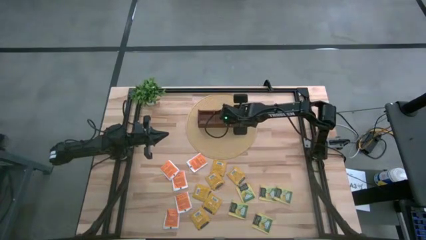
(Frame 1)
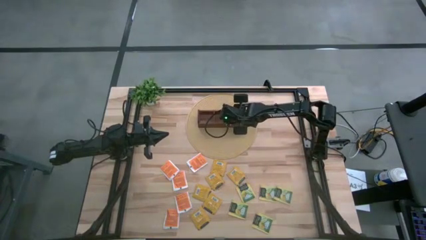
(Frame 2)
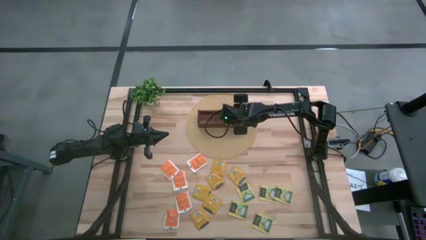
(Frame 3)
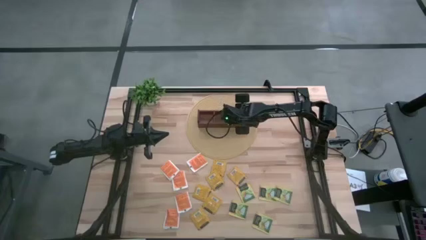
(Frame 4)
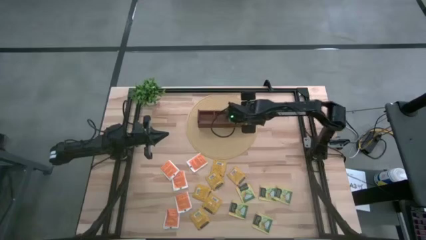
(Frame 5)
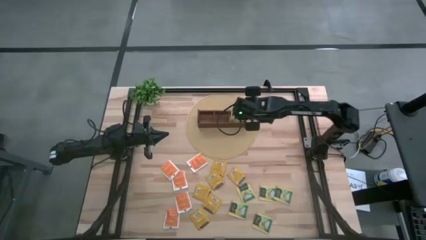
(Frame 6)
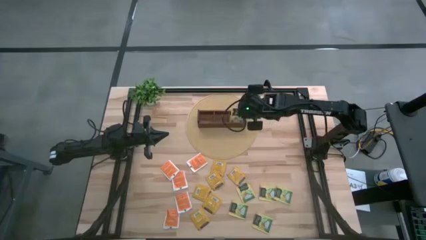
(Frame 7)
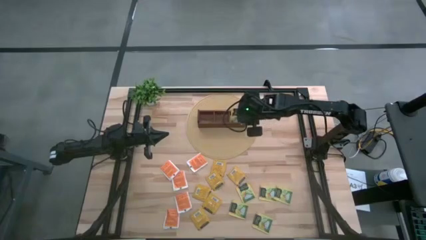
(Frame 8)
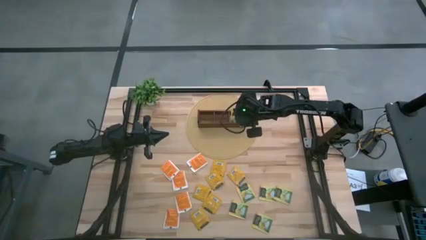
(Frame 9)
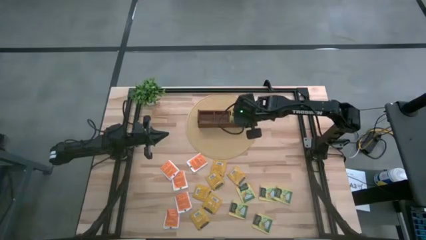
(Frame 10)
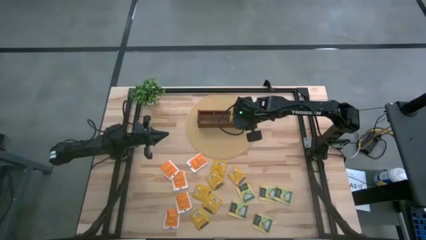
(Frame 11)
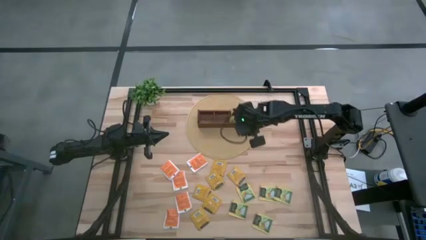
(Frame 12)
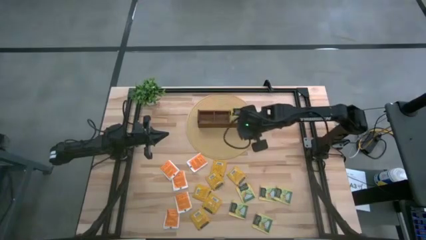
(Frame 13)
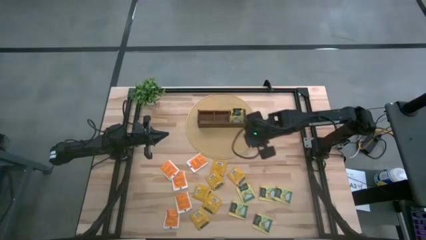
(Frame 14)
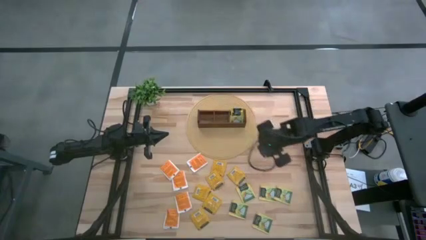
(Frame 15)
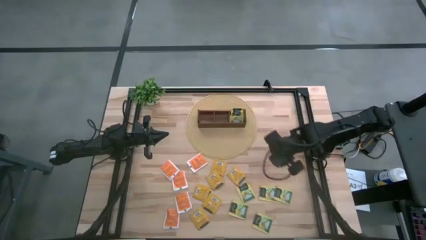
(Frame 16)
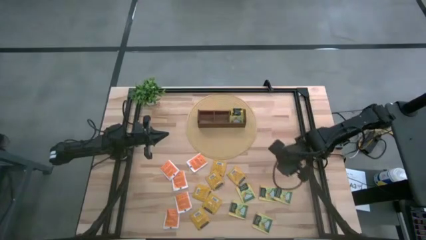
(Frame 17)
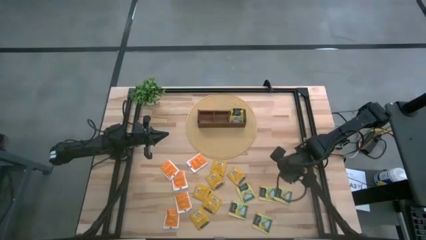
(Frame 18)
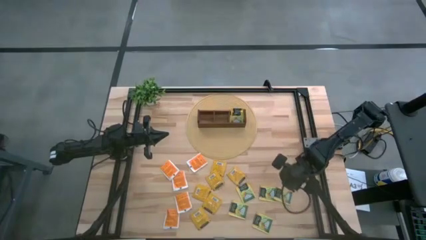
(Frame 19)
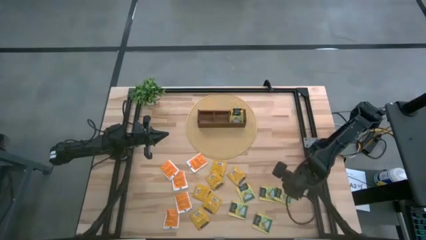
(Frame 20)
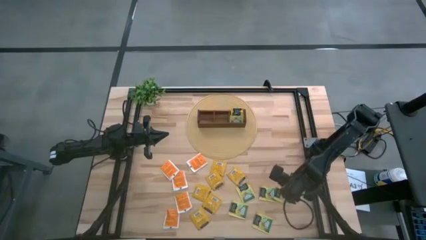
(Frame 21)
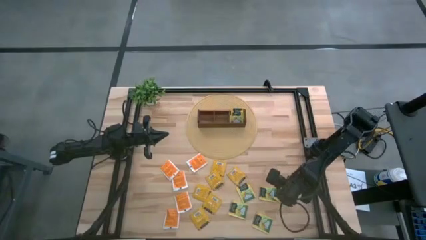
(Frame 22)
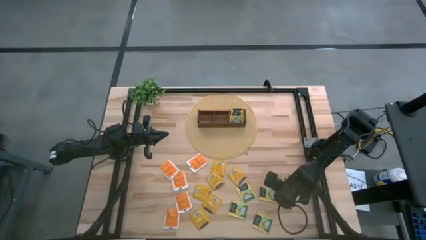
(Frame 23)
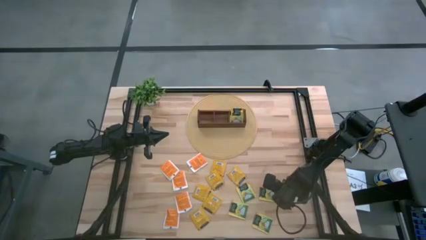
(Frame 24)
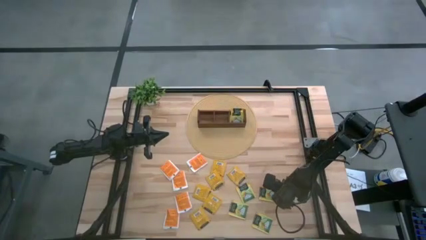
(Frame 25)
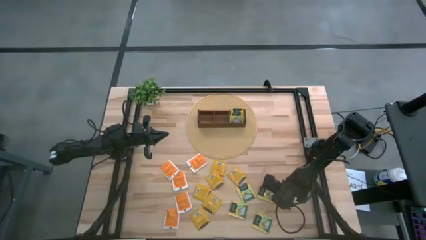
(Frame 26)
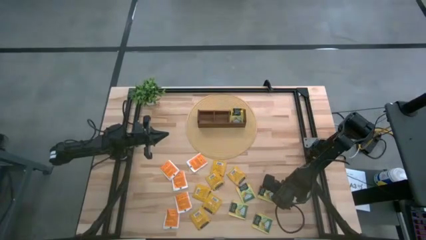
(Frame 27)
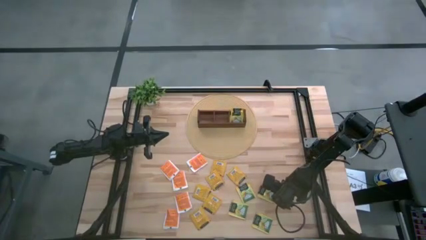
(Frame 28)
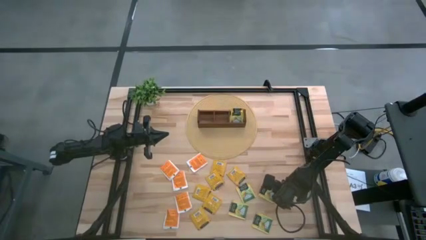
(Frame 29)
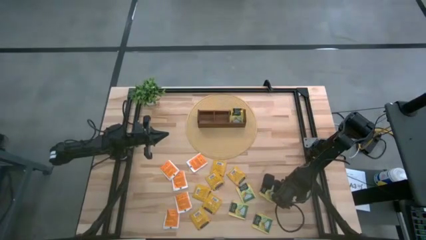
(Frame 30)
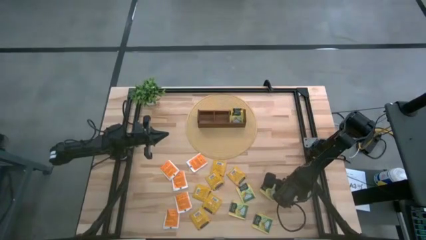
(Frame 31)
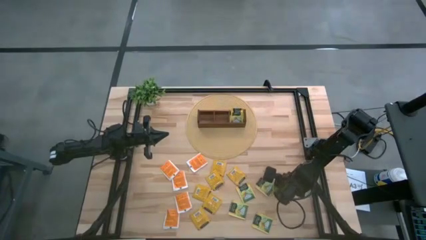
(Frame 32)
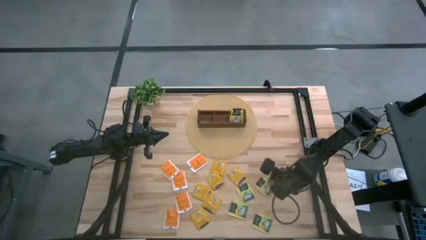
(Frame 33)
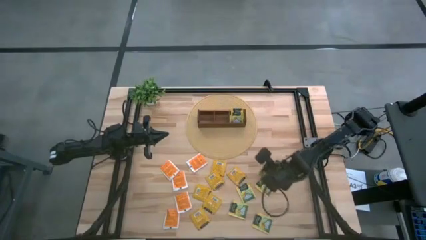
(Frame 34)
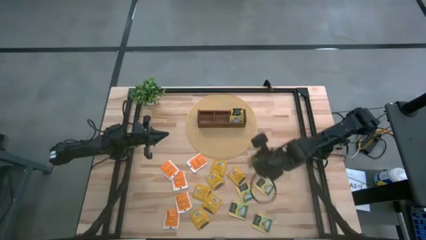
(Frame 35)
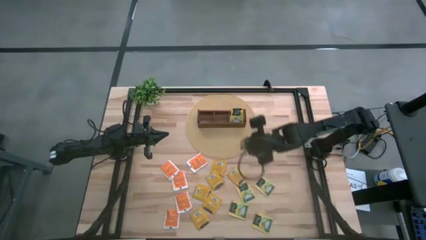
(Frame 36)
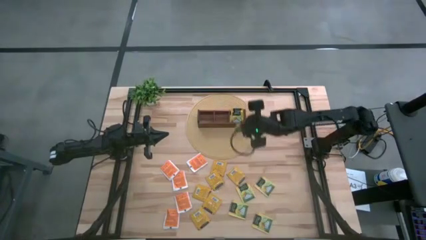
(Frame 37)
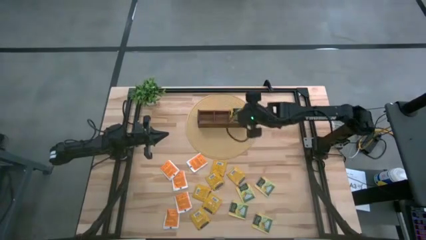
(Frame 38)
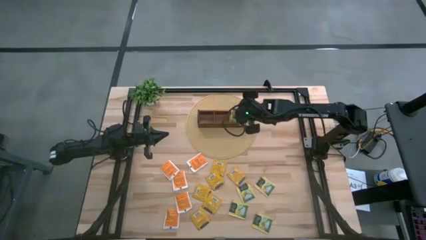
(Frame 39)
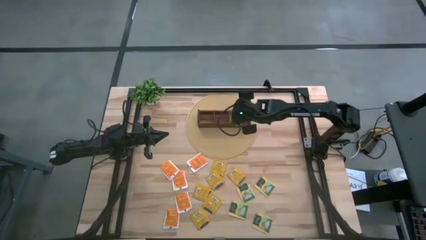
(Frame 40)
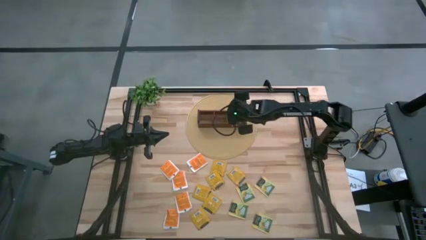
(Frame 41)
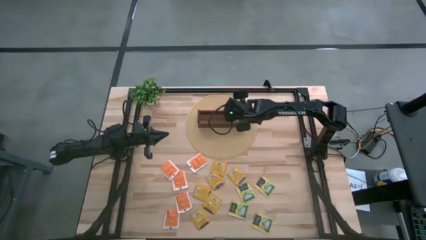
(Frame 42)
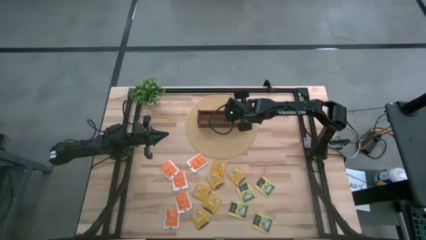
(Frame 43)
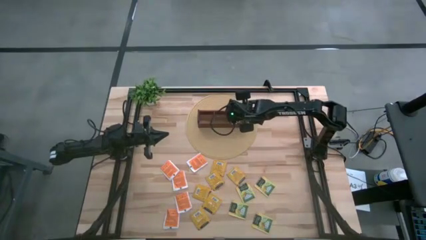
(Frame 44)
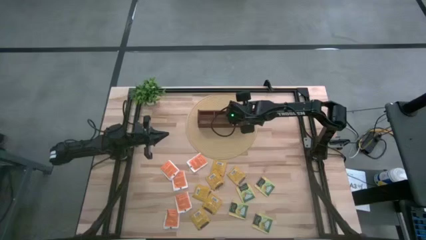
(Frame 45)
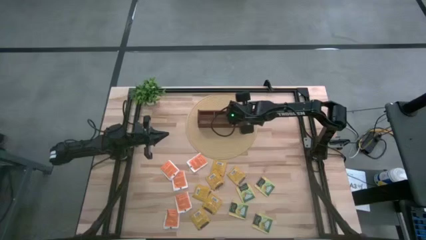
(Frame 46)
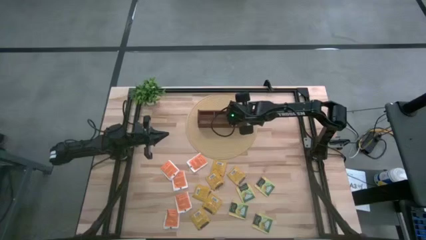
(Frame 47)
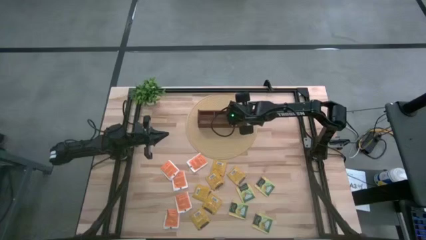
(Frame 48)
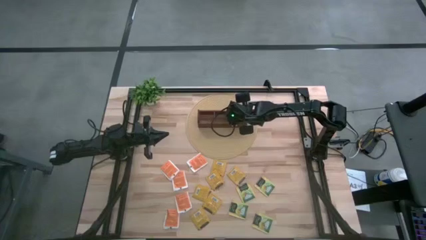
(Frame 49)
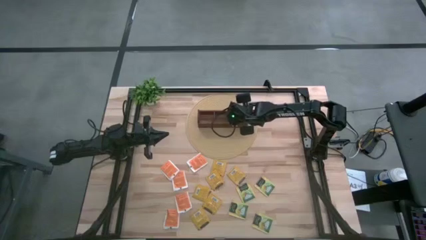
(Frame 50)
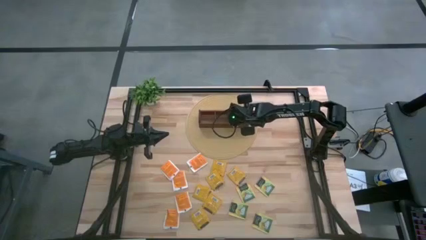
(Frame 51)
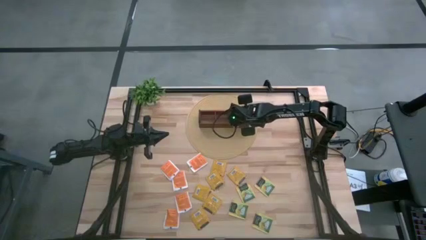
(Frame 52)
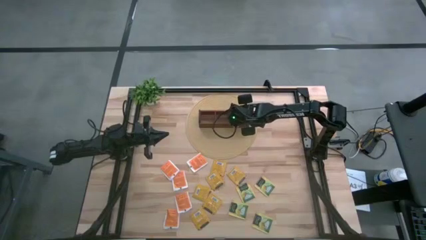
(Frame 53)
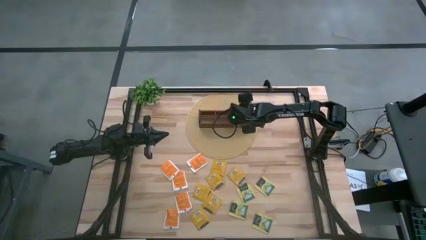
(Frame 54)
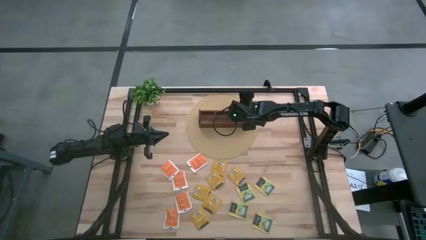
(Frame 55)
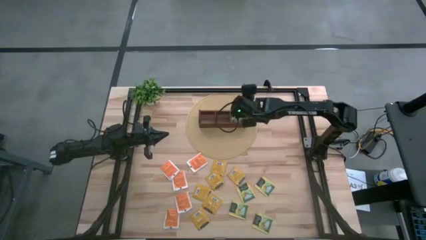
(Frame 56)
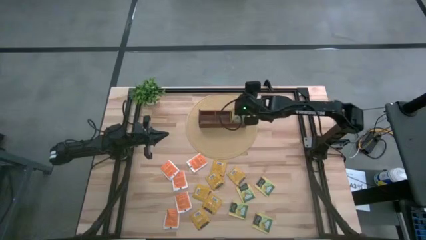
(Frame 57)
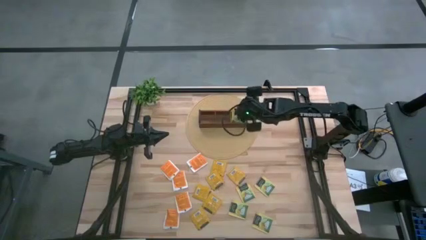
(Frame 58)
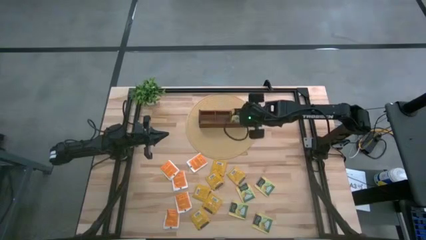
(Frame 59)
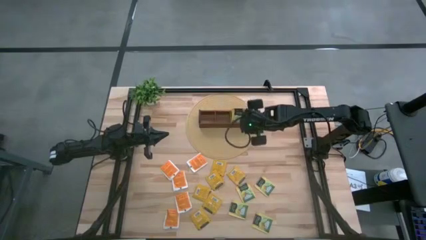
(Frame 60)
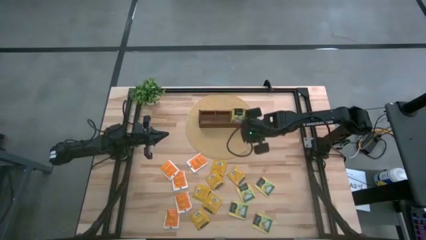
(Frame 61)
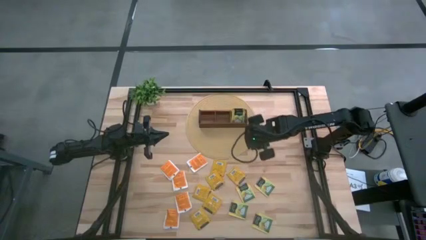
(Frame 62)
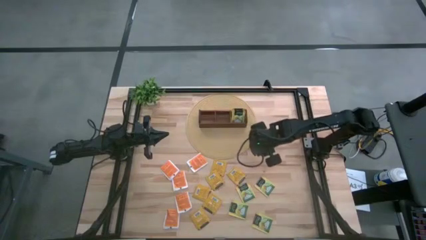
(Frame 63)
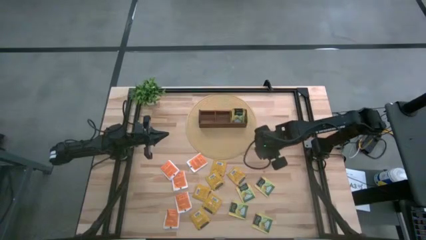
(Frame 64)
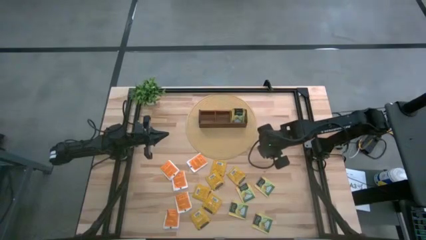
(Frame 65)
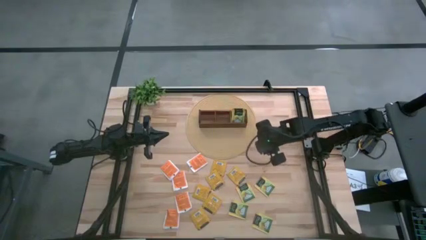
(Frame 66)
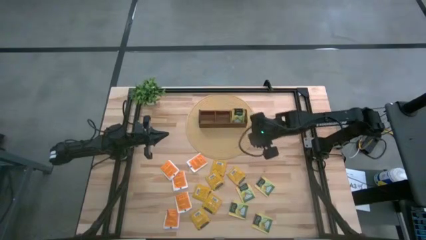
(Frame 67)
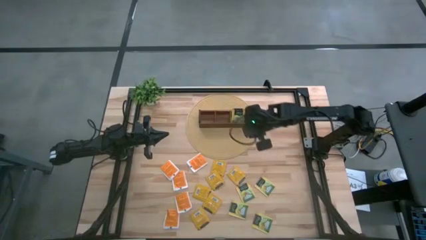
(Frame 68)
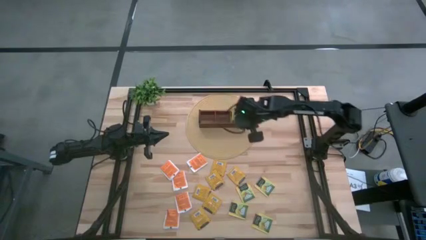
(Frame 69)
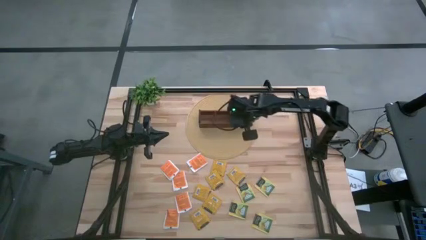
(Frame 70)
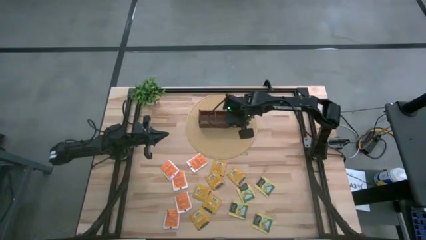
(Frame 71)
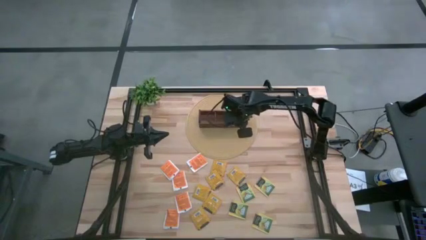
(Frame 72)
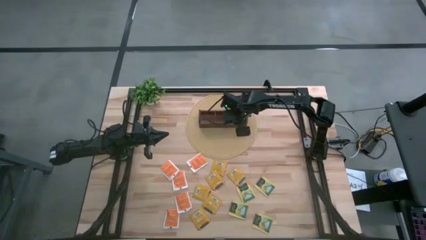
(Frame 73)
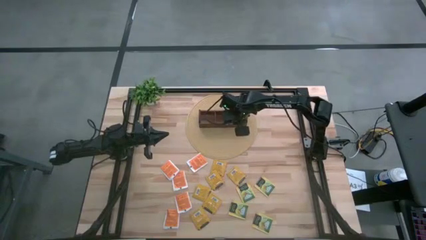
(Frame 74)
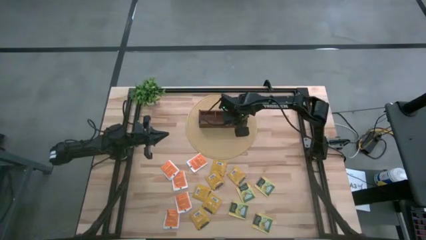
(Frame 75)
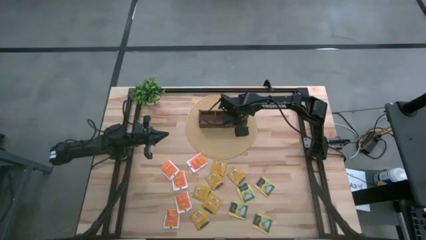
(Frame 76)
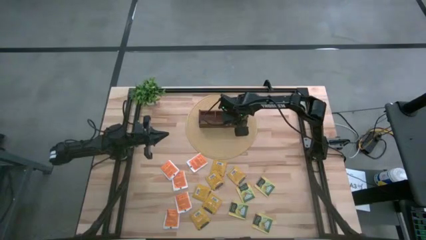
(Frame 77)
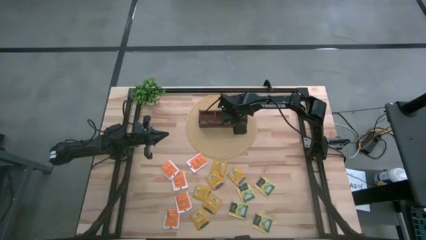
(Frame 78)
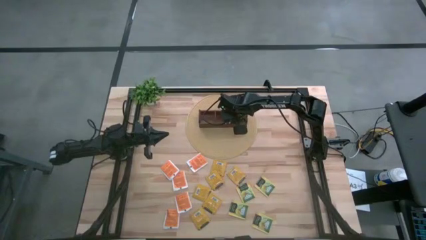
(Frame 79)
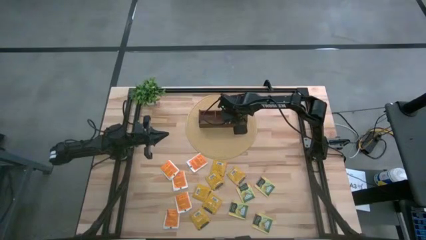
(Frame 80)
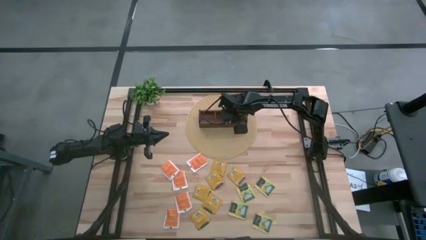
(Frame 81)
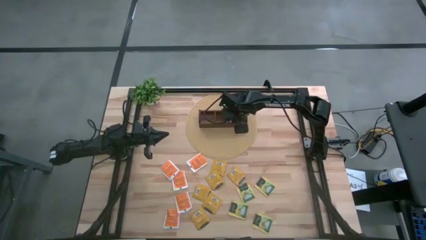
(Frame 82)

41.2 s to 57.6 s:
Task: Pick & Place Tea
Put the yellow tea bag into the right section of the wooden organizer

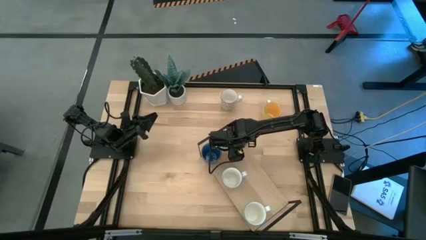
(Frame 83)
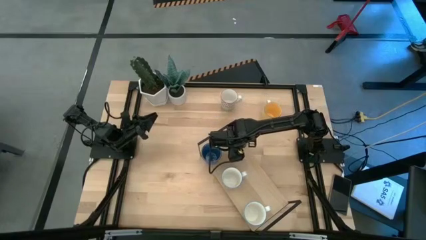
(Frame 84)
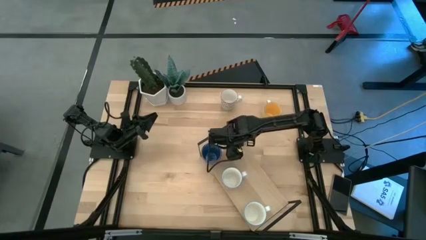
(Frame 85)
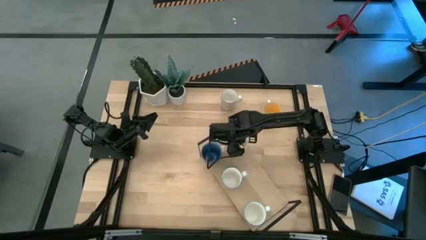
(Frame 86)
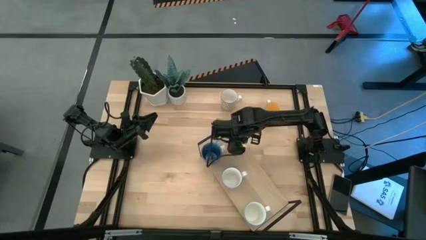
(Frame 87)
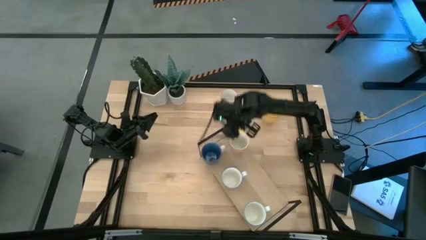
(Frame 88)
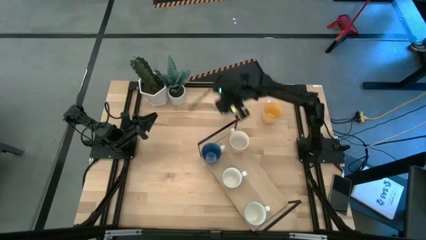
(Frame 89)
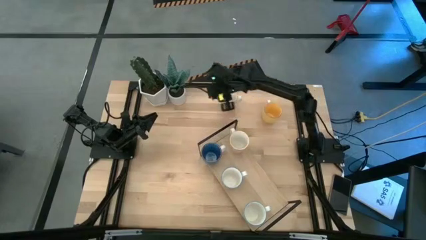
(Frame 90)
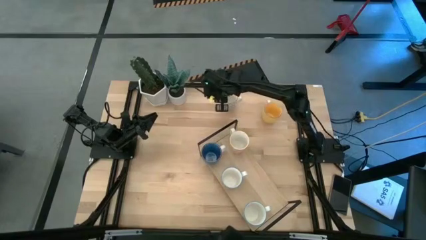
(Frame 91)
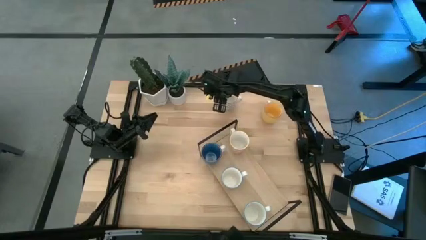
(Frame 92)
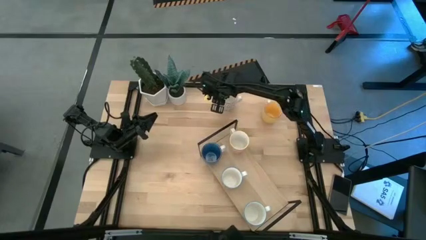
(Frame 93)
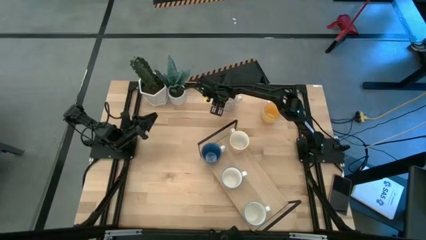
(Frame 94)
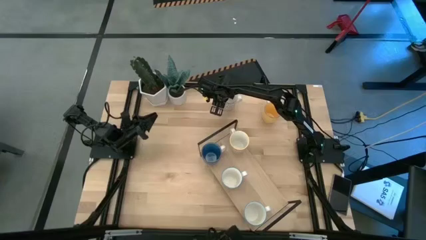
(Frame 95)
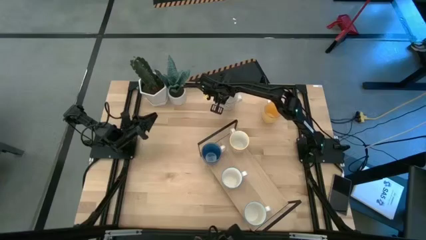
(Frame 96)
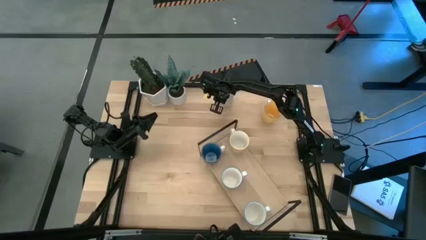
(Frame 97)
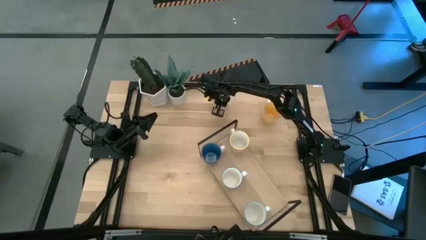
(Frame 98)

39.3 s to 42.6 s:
Task: Place coffee mugs
Put the gray patterned mug on the shelf
